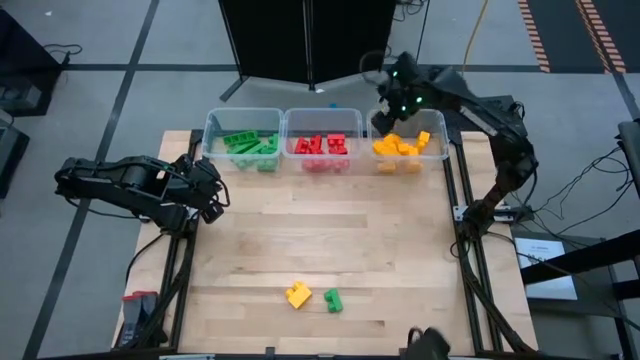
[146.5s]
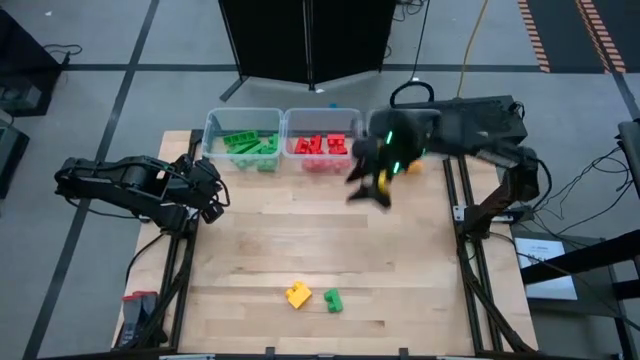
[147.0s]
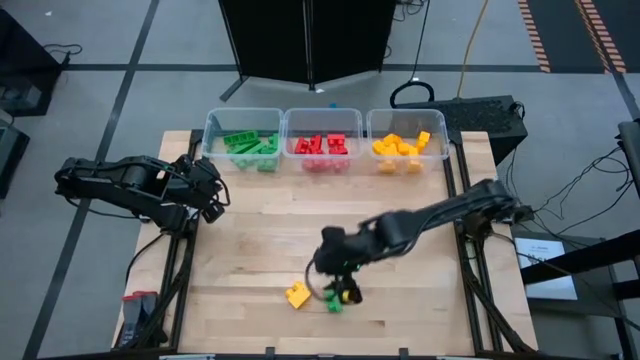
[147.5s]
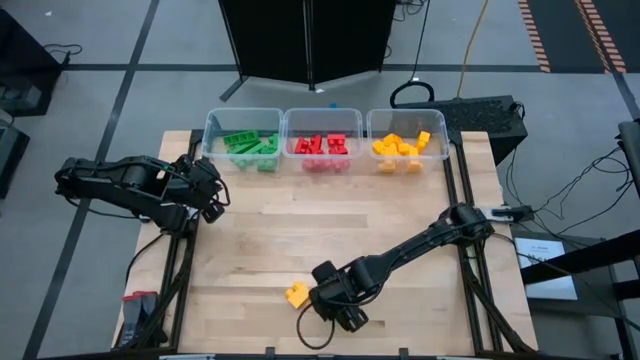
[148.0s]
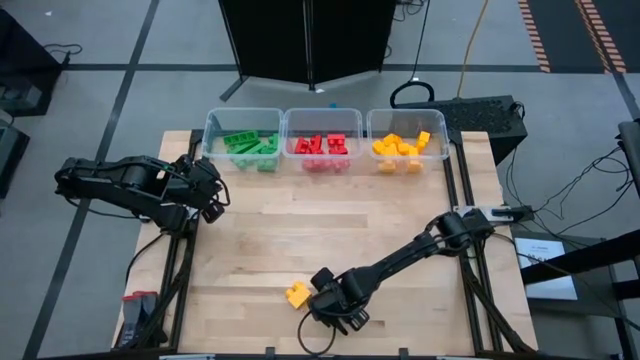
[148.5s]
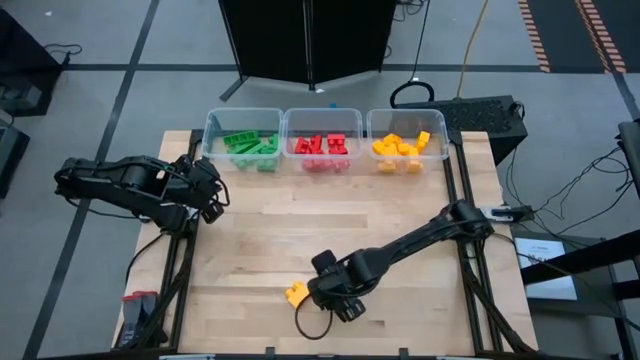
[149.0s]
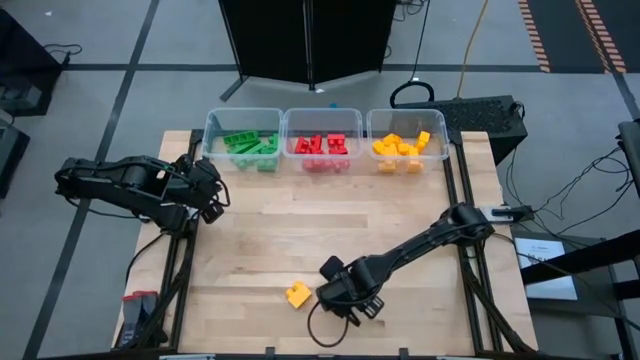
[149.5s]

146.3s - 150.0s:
Task: Sort blocks
Put the green game piece with 2 studs into the left transparent bin

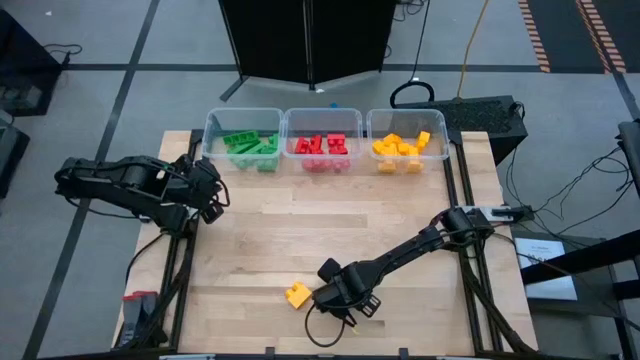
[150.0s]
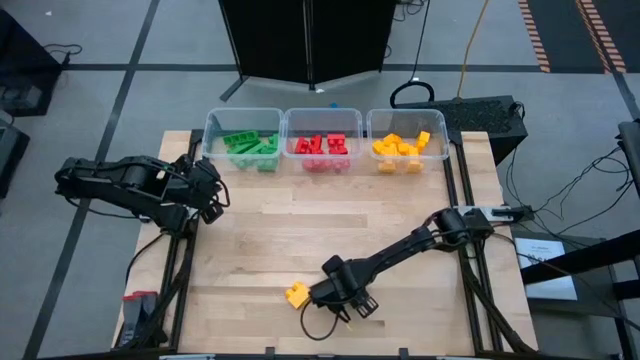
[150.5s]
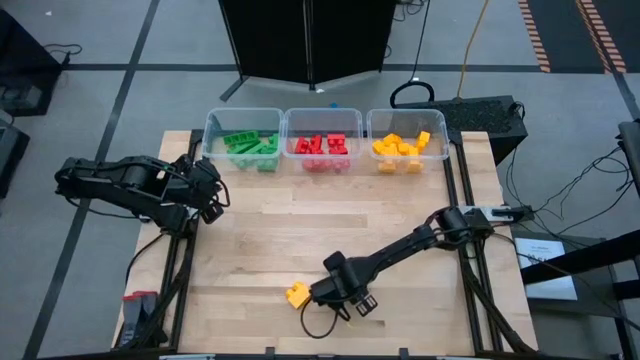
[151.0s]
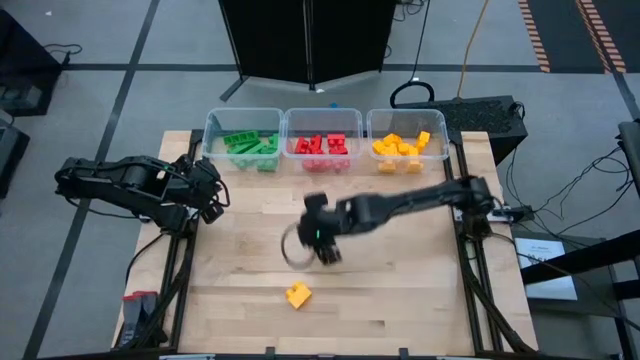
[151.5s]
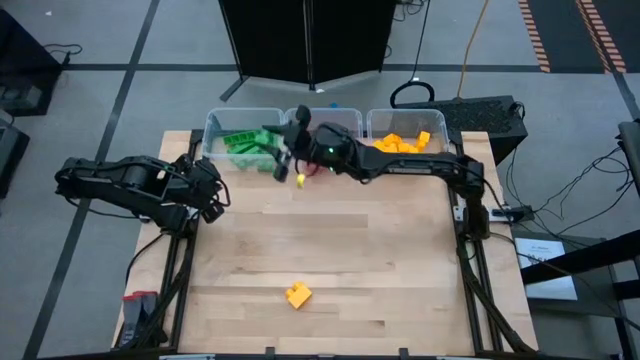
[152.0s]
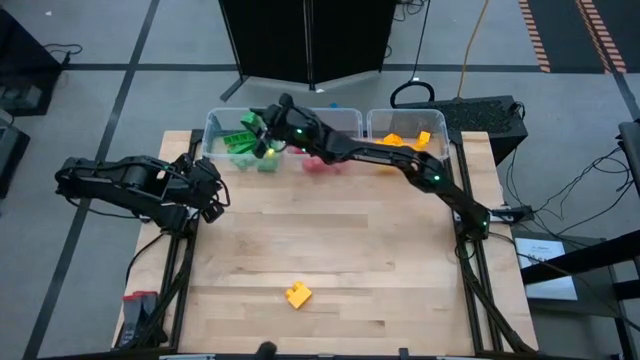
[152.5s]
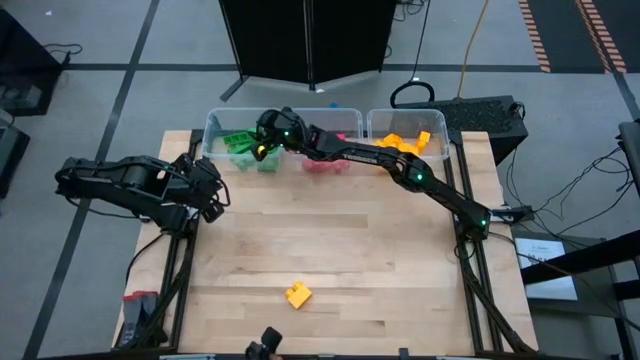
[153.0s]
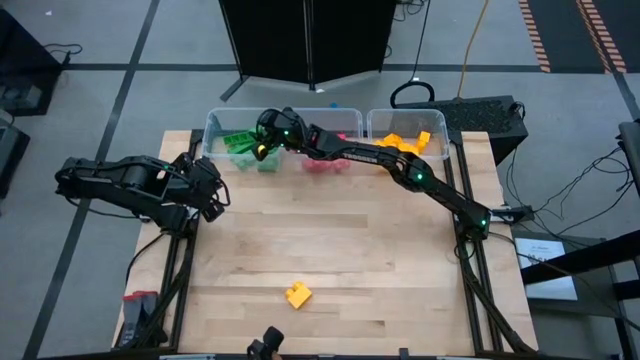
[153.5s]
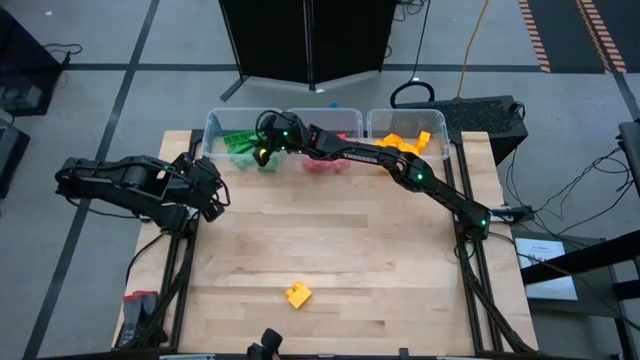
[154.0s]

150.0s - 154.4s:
Put the green game piece with 2 studs into the left transparent bin

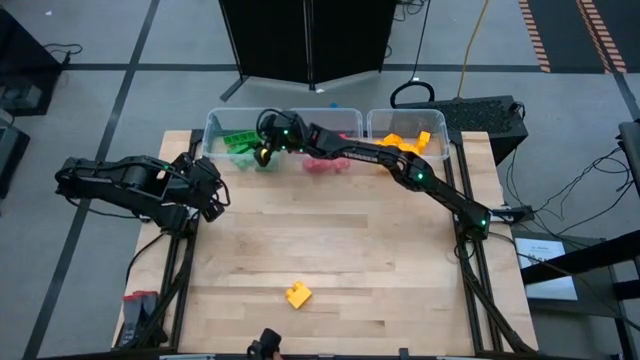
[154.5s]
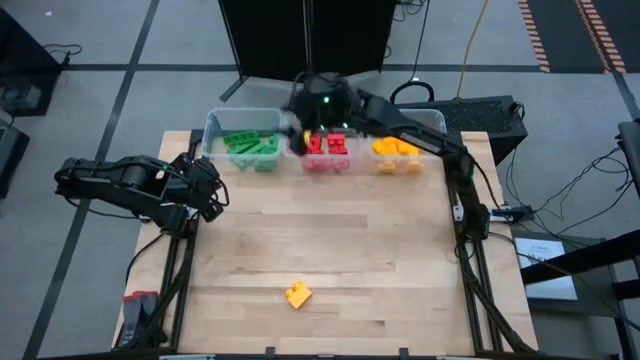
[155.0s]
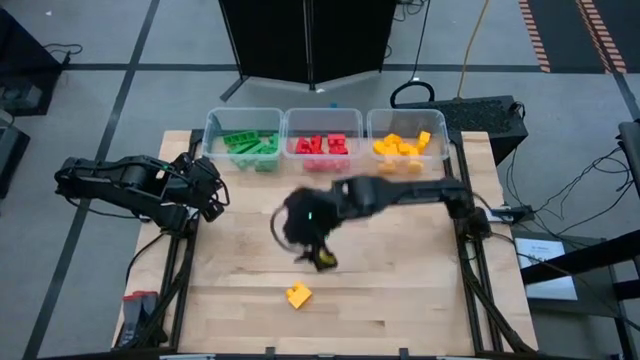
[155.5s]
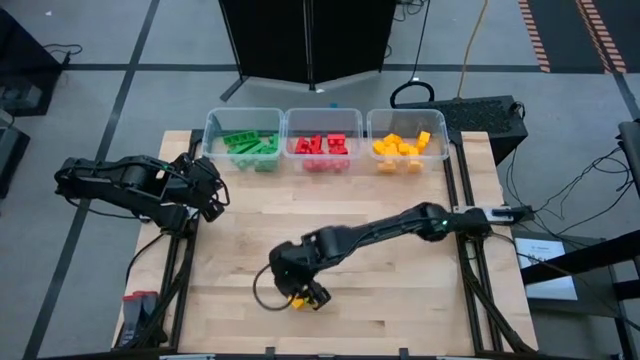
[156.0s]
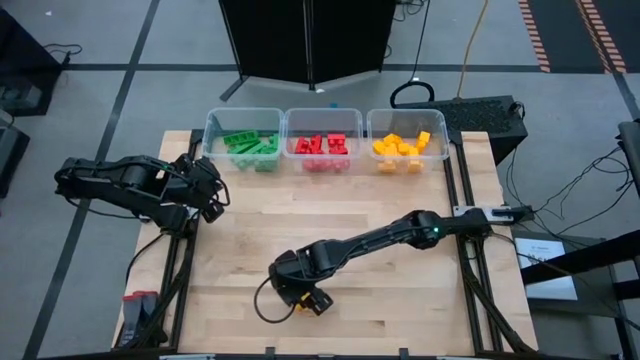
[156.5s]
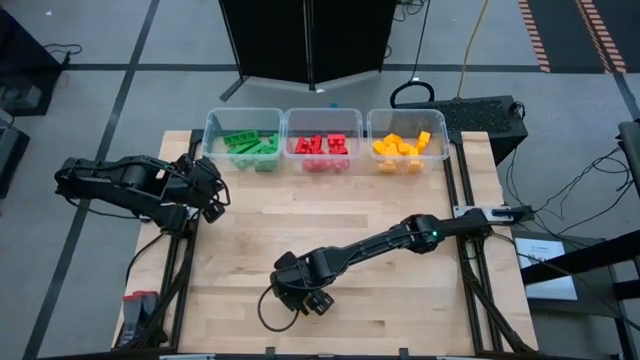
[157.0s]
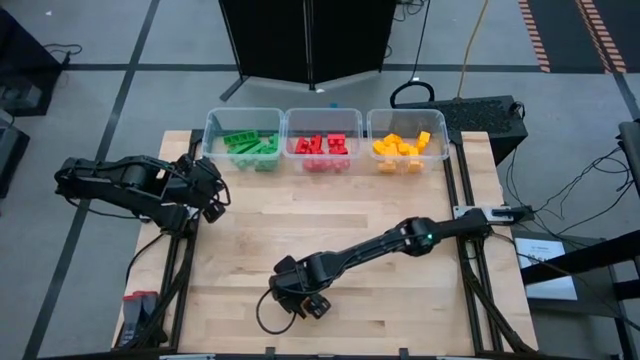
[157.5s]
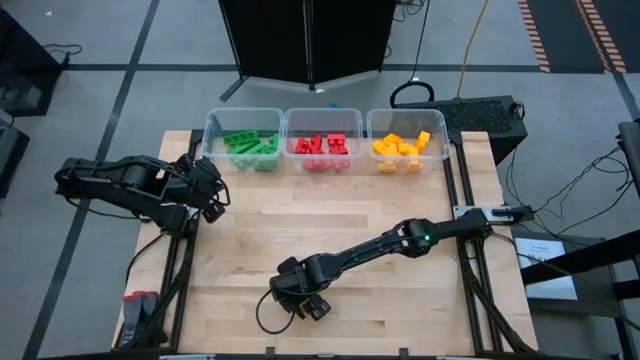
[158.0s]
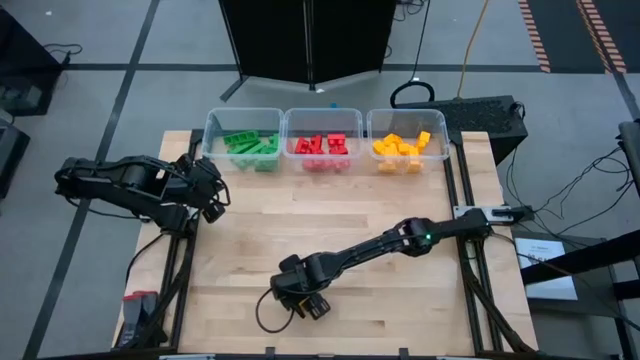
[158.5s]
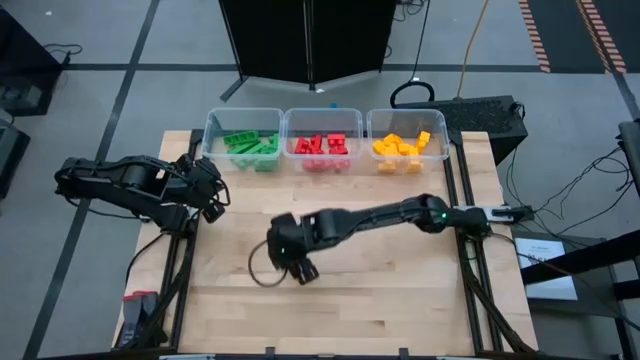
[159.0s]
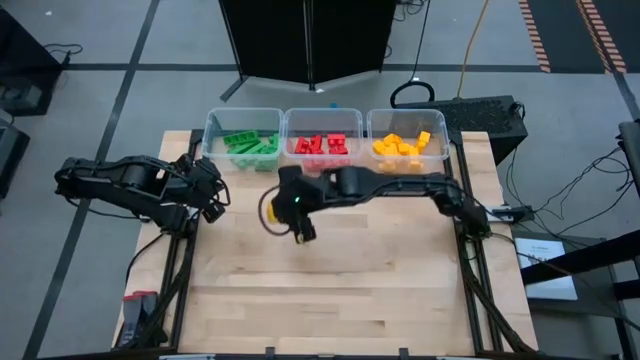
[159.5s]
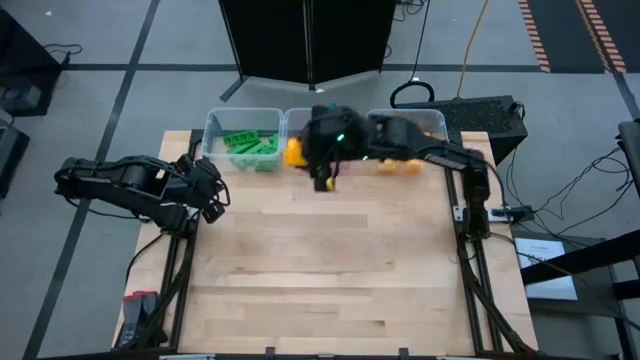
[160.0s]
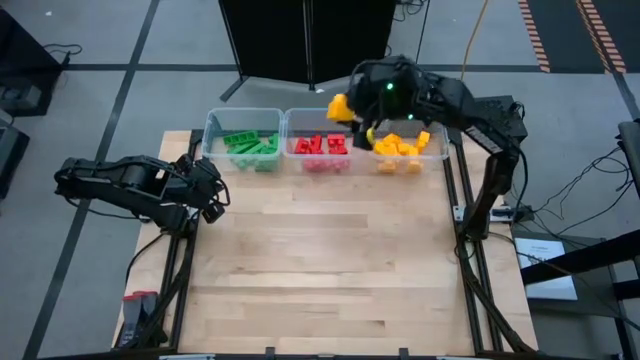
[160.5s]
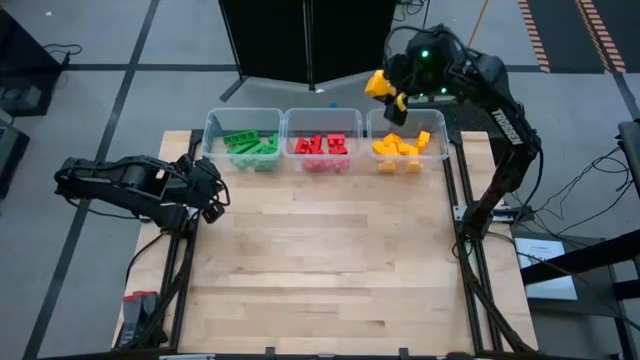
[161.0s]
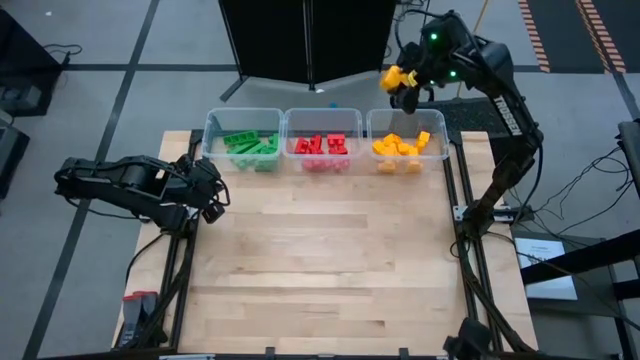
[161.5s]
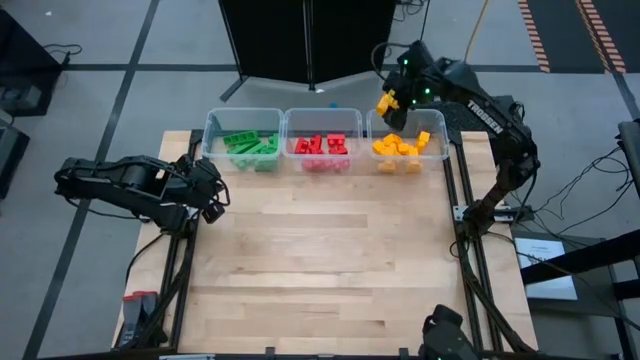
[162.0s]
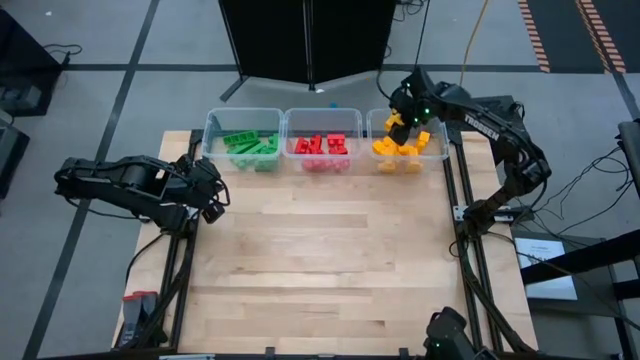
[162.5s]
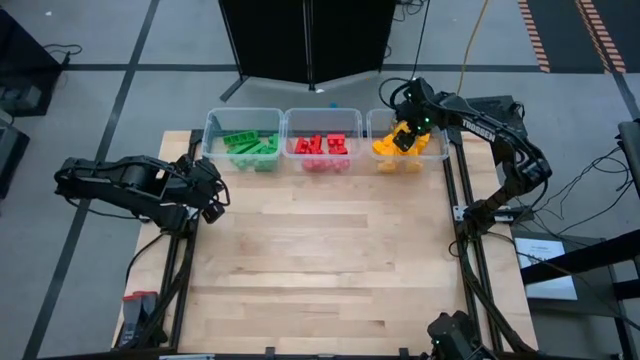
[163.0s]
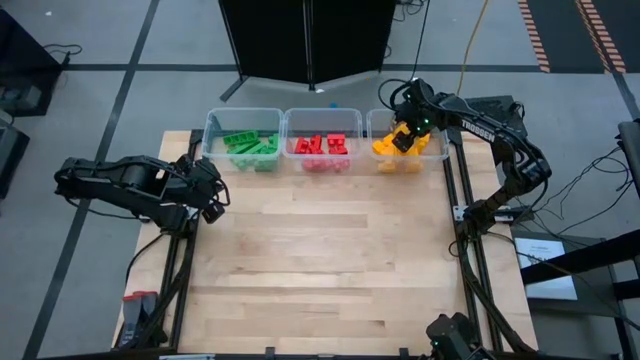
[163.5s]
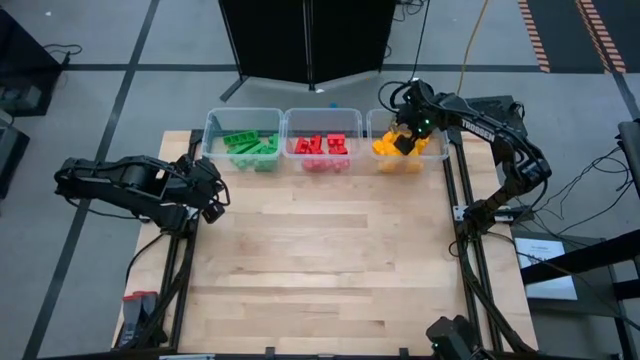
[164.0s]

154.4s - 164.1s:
Put the yellow game piece with 2 studs into the right transparent bin

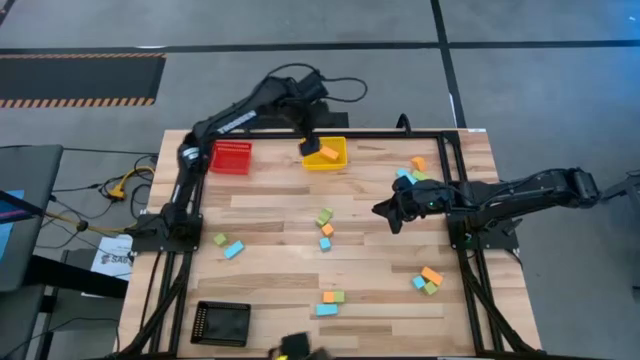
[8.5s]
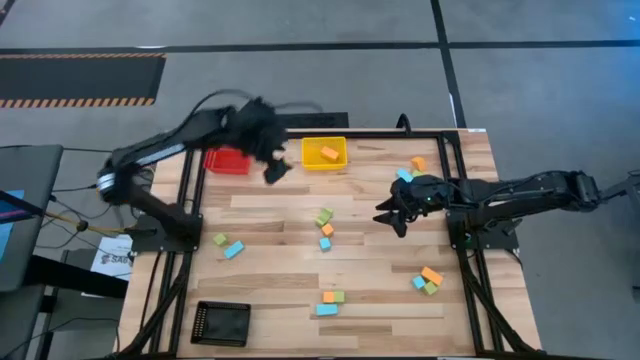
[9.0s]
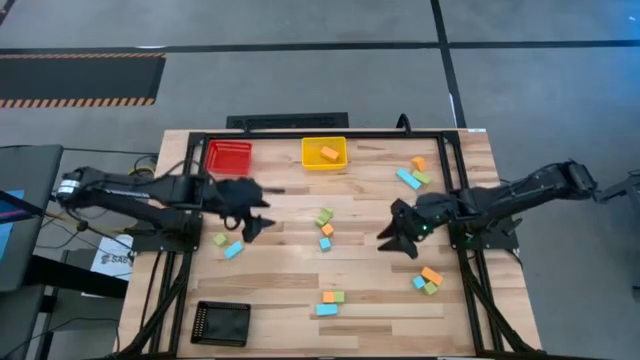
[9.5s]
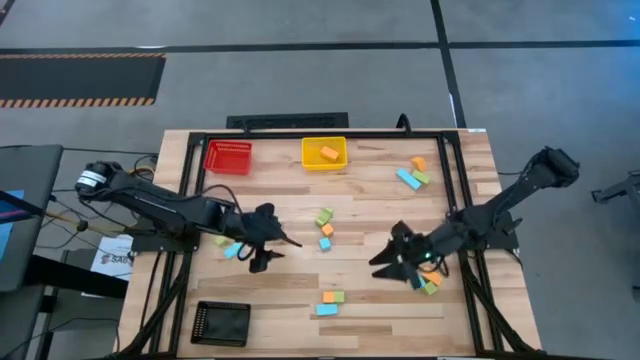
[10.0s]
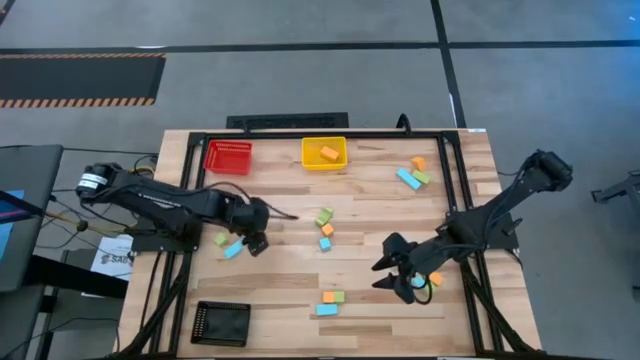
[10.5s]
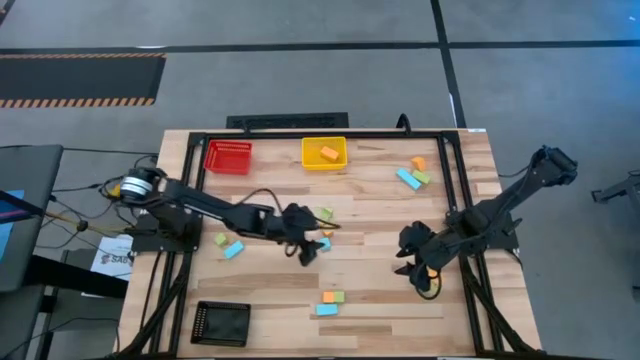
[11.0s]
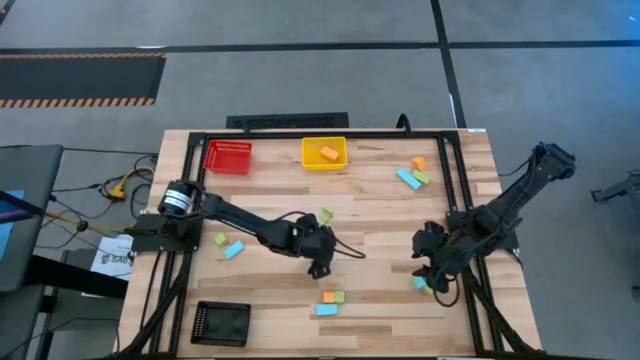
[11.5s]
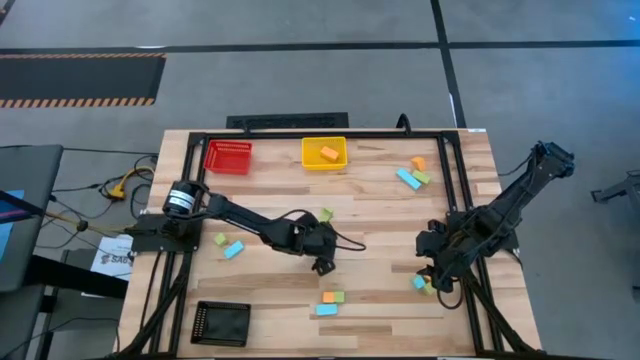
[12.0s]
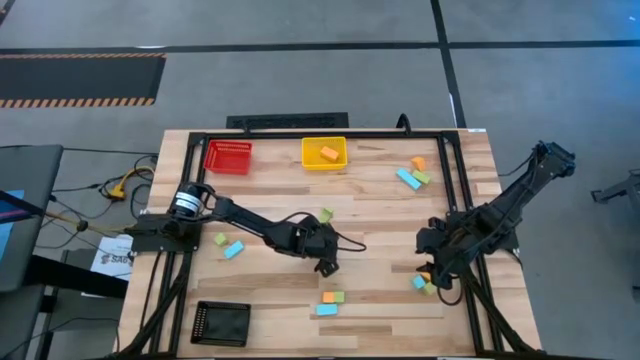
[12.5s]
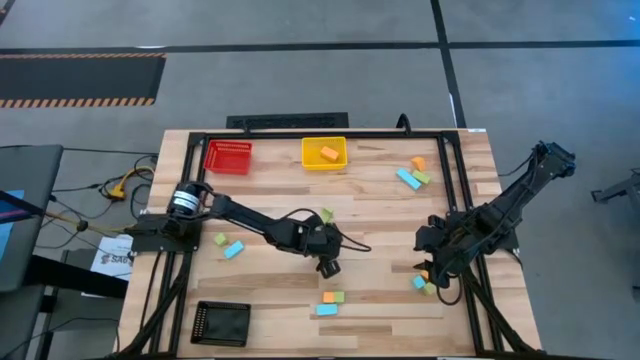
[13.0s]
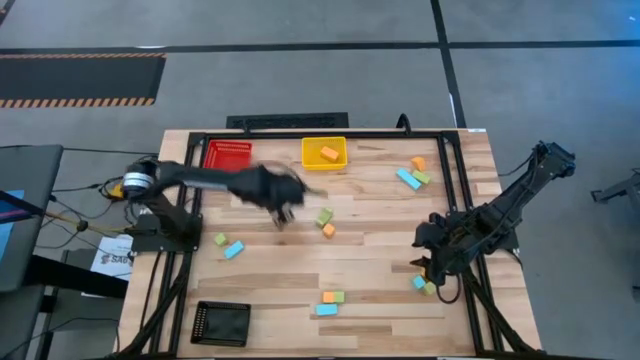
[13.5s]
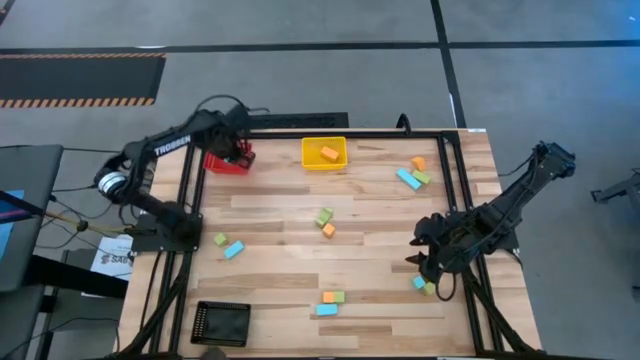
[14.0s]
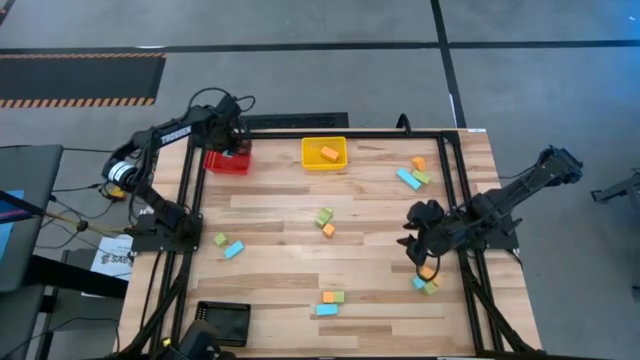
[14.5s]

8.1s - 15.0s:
Task: Sort & place blocks by color
Put the wooden blue block into the red bin
